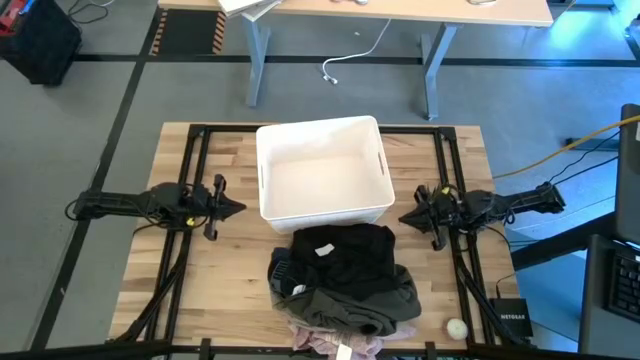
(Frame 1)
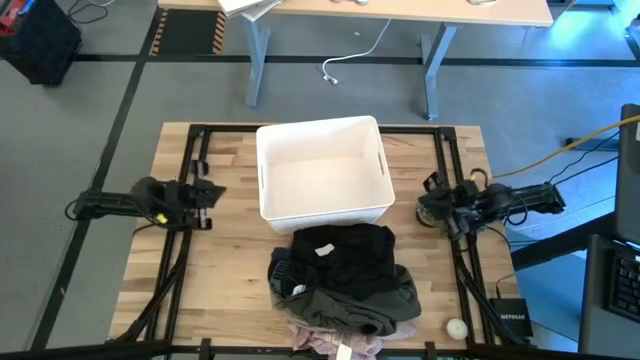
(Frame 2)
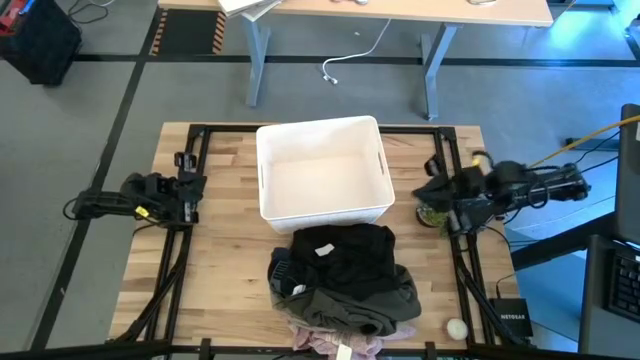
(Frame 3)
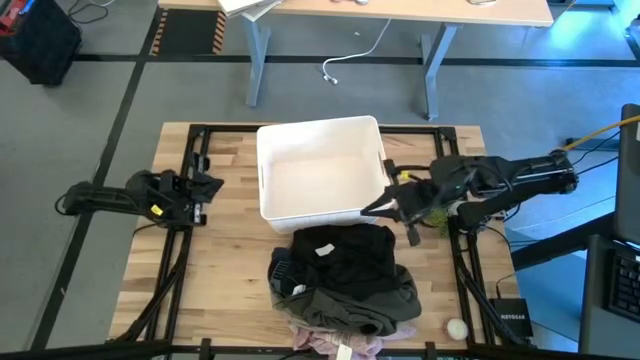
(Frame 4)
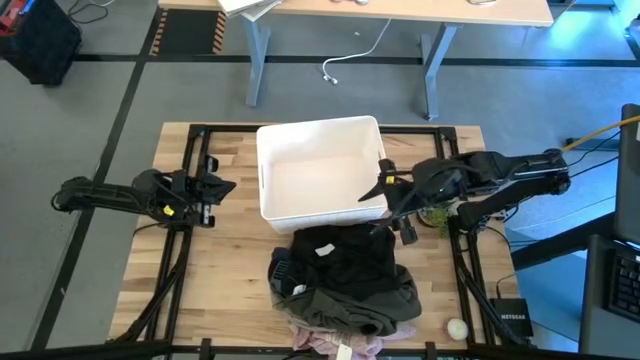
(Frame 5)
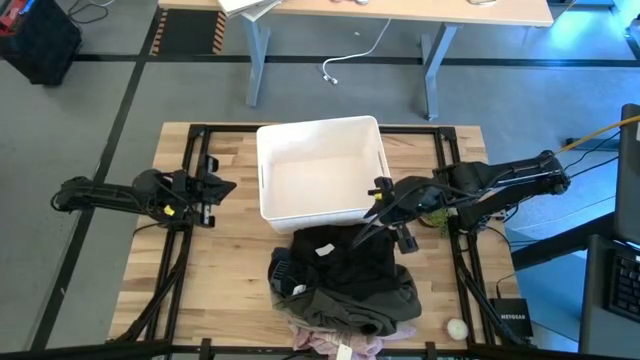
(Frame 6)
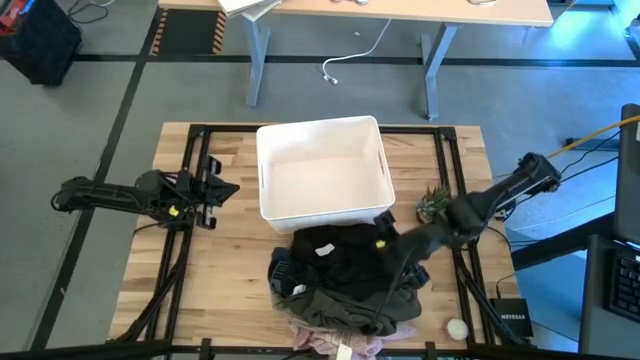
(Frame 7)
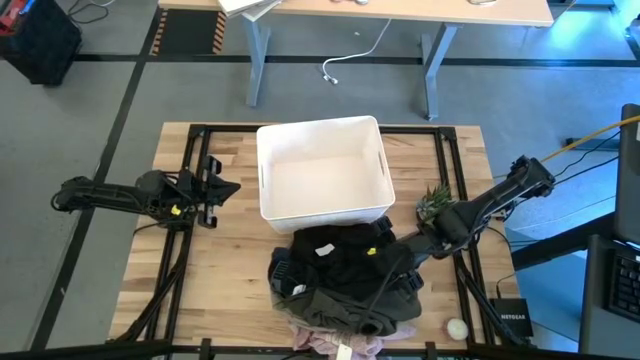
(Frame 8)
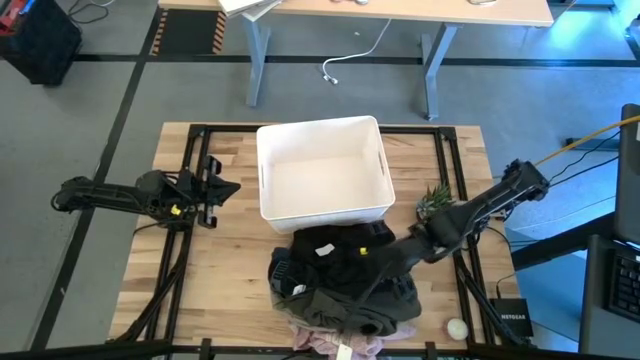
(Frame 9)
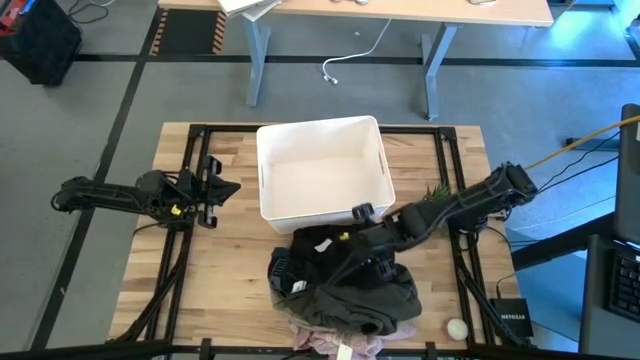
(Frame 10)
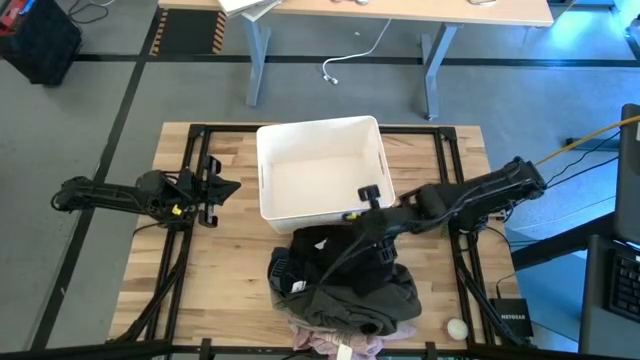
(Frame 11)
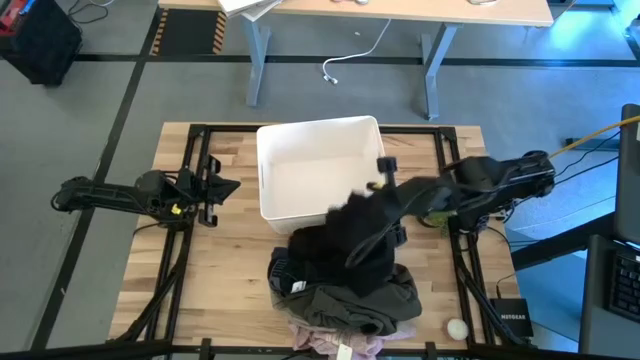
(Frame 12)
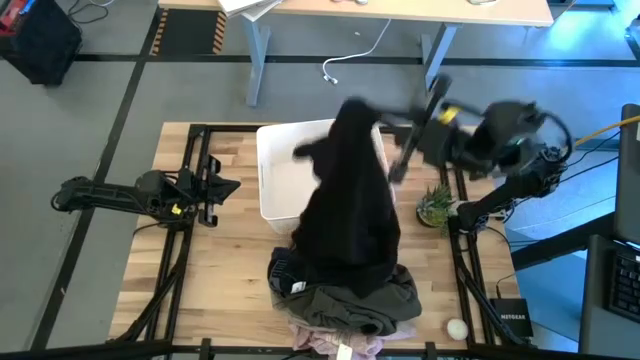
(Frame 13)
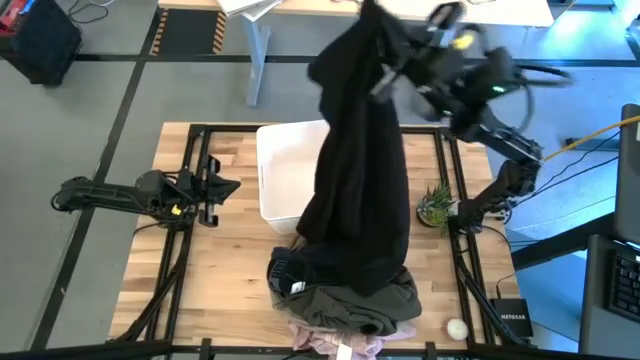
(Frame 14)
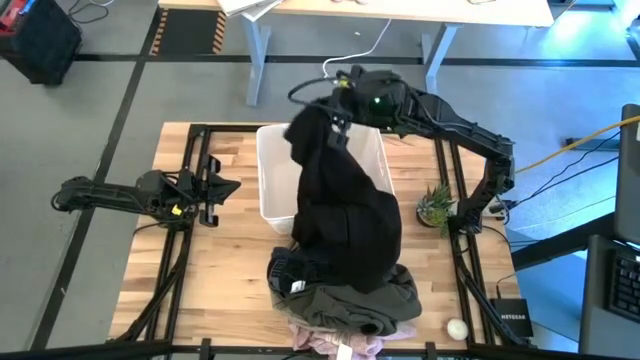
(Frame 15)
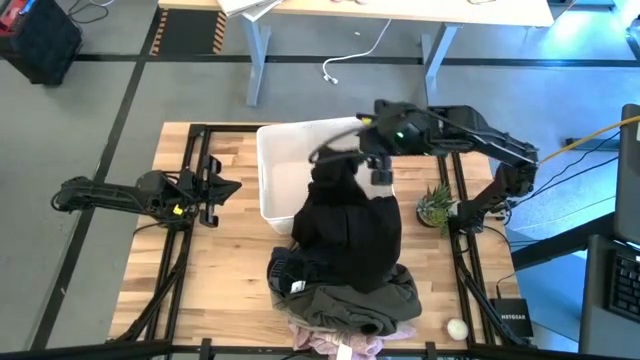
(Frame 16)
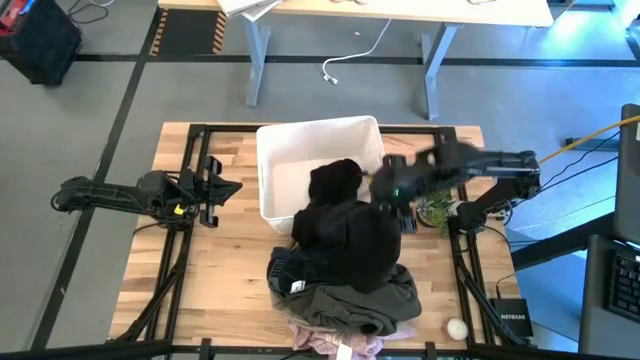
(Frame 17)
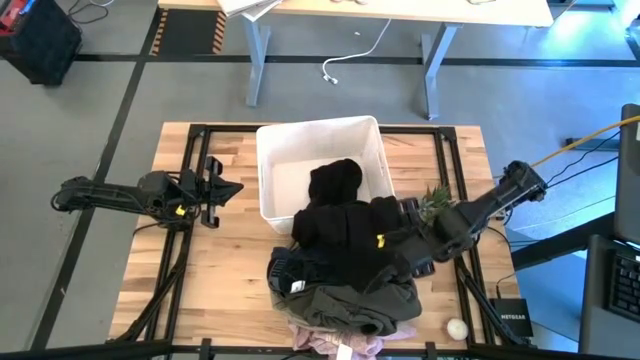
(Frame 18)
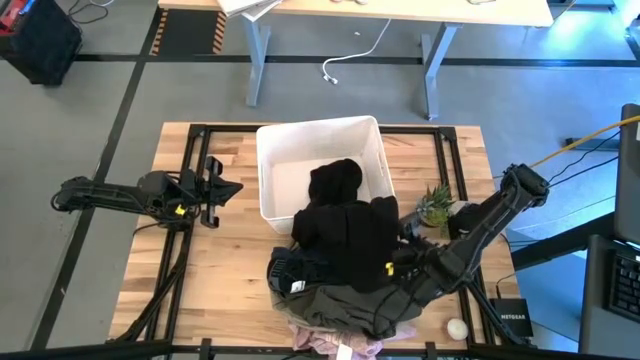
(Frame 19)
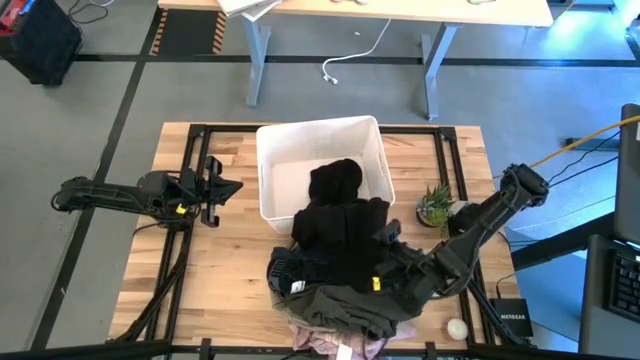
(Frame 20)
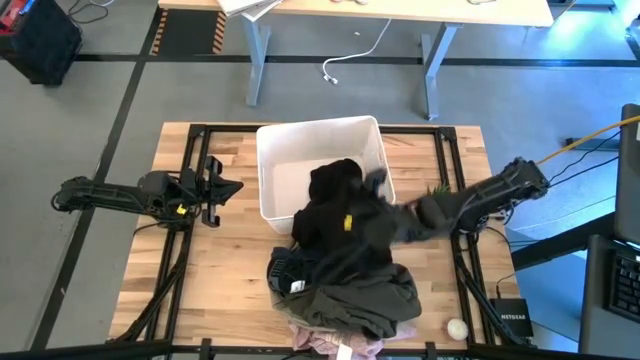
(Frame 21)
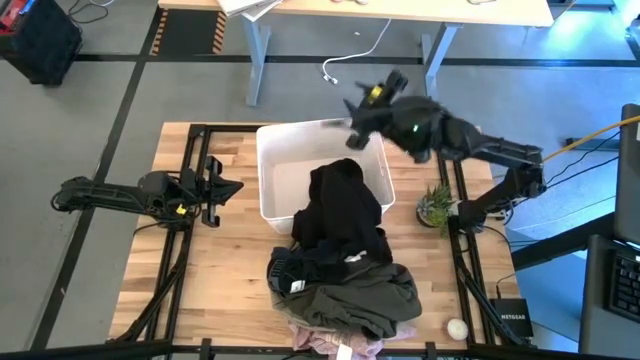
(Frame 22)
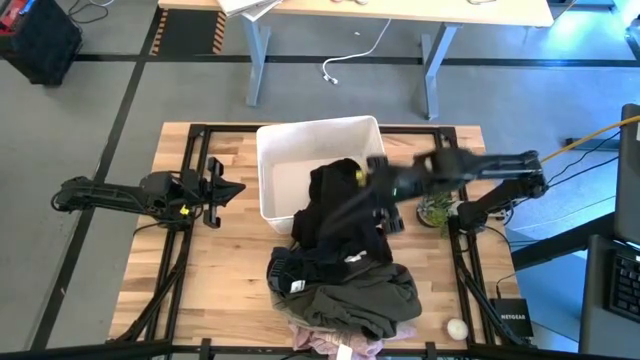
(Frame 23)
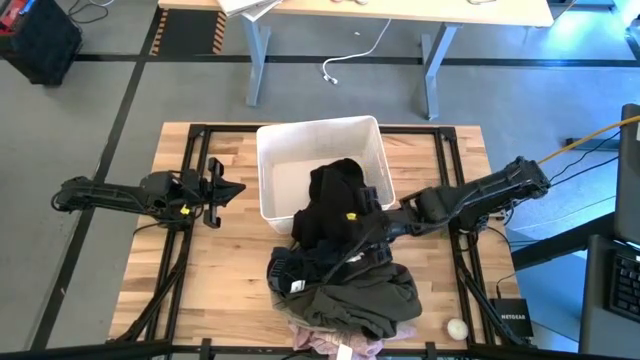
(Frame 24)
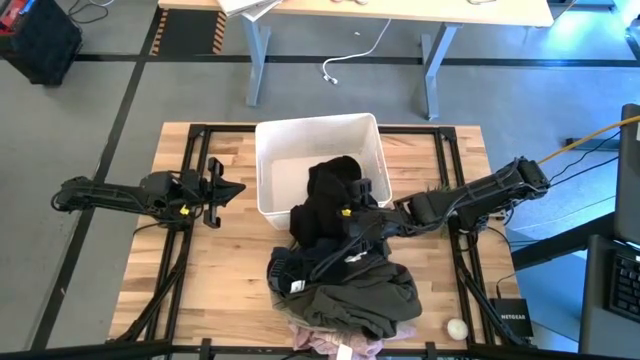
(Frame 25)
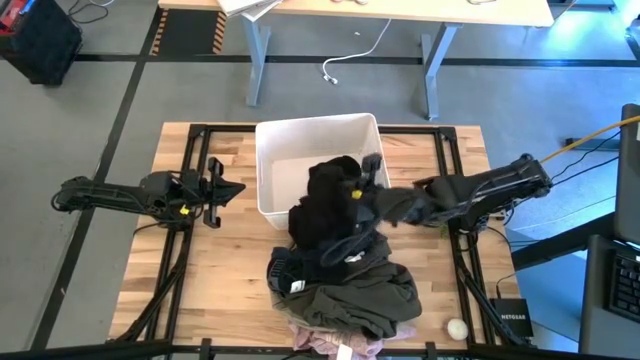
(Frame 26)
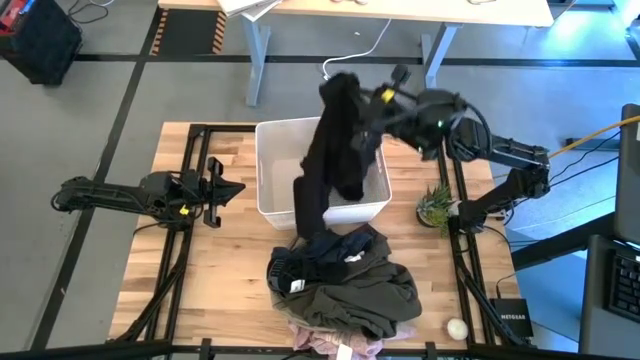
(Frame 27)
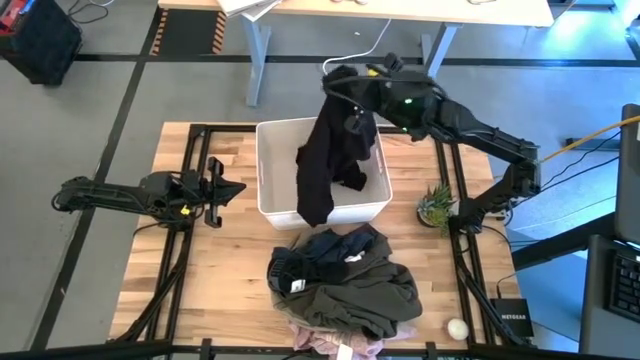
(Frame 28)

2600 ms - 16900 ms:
Task: Sort clothes
Put the black jacket into the laundry bin

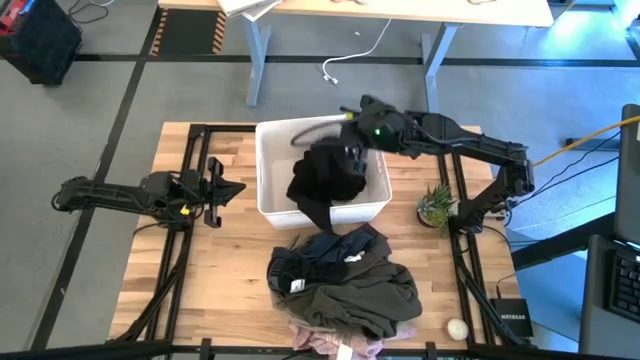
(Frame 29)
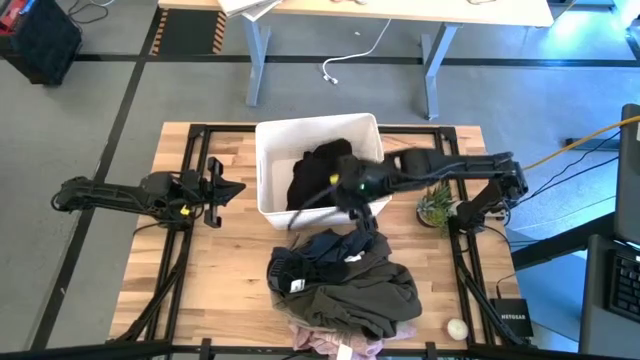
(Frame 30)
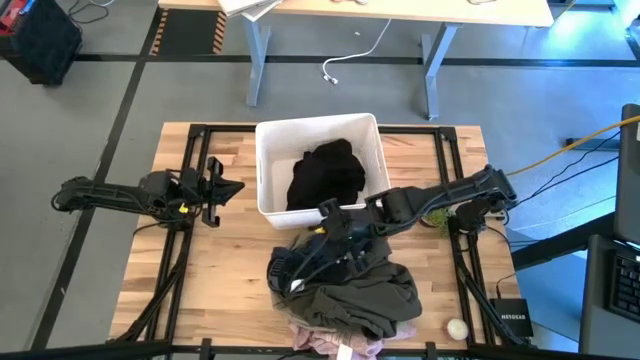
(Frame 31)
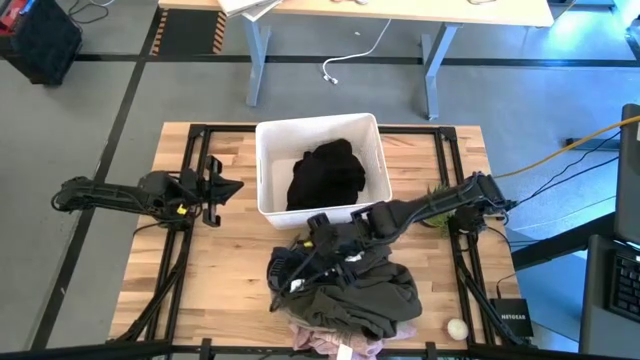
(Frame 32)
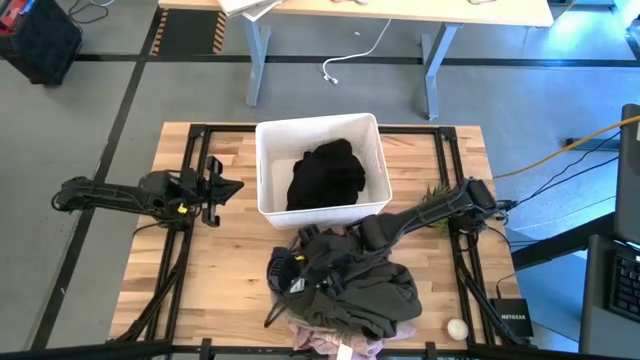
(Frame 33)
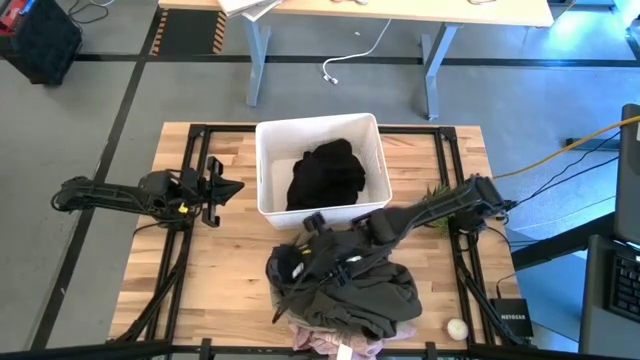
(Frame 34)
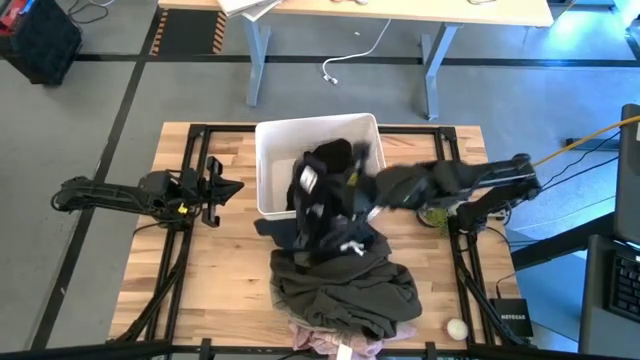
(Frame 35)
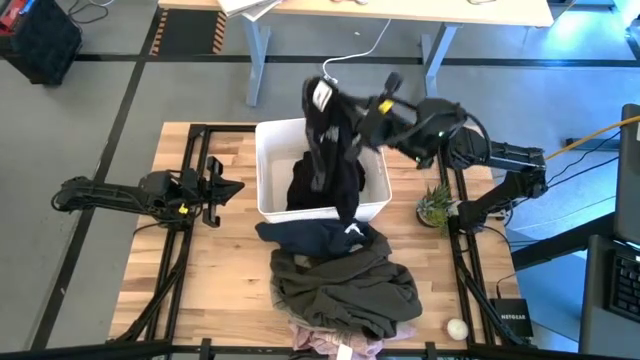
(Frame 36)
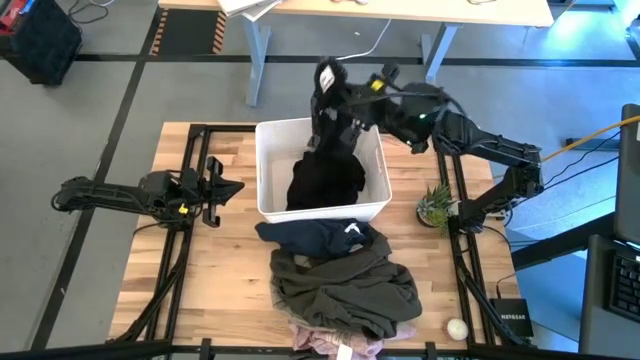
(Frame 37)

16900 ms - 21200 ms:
Put the black boxer into the laundry bin

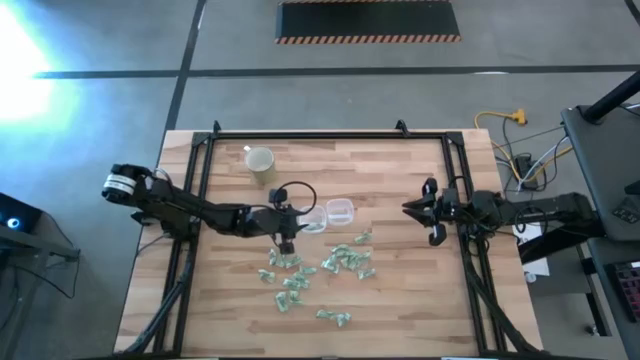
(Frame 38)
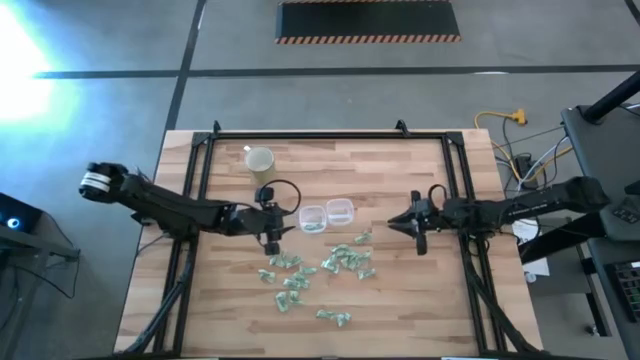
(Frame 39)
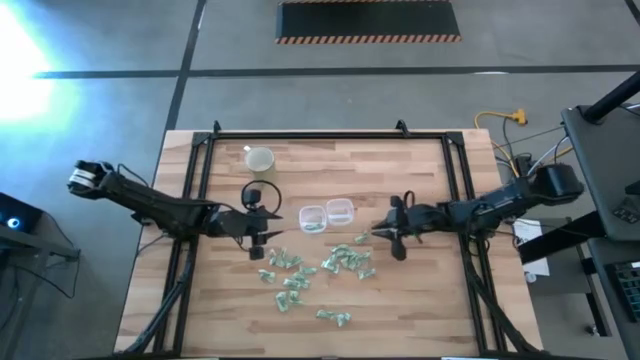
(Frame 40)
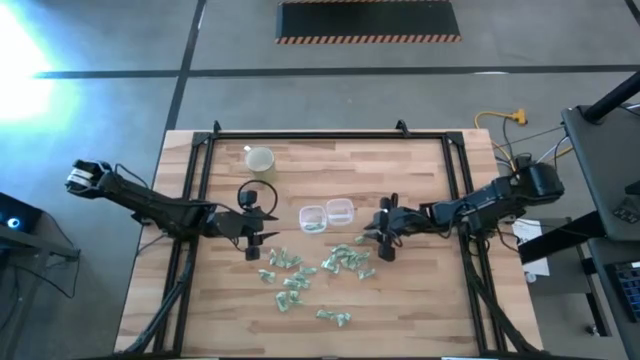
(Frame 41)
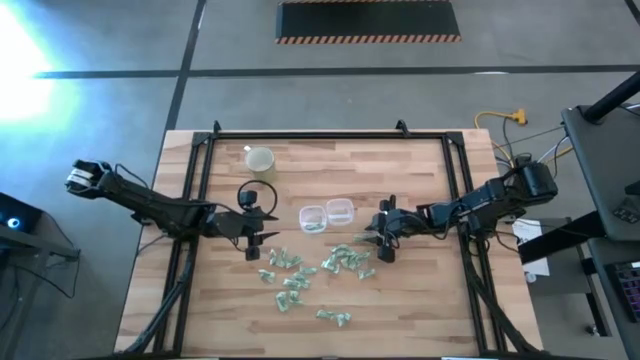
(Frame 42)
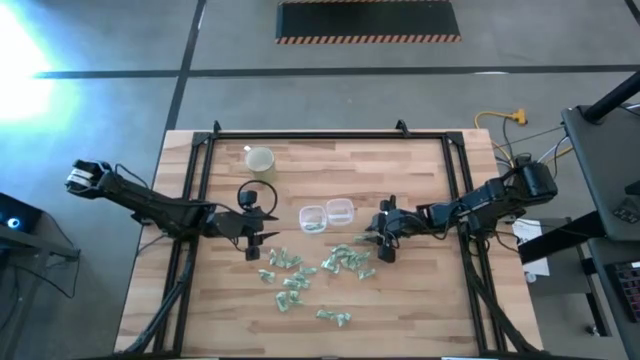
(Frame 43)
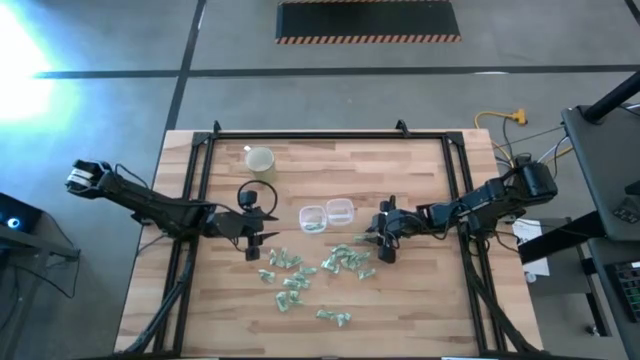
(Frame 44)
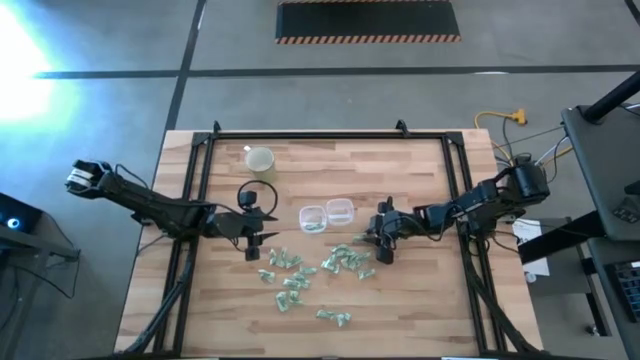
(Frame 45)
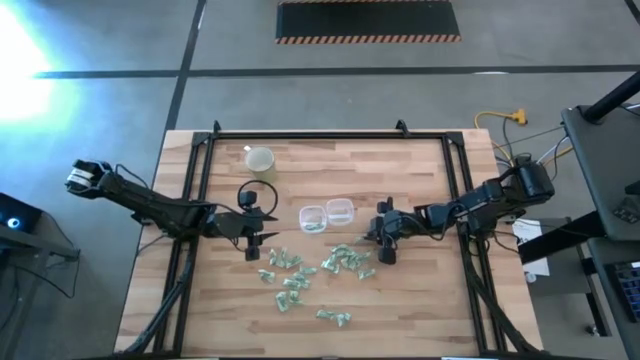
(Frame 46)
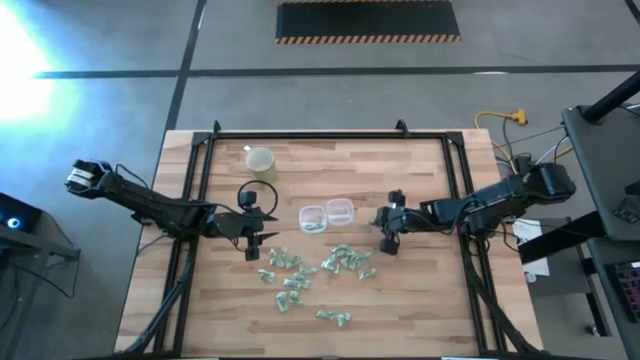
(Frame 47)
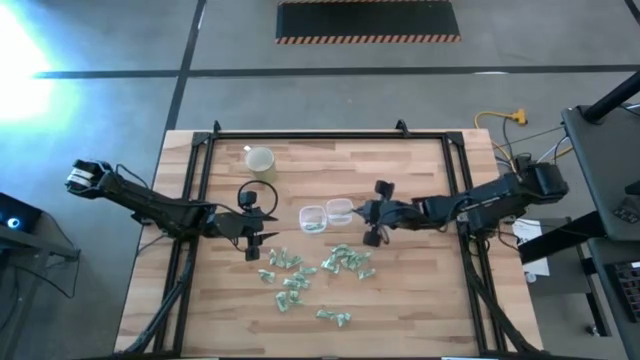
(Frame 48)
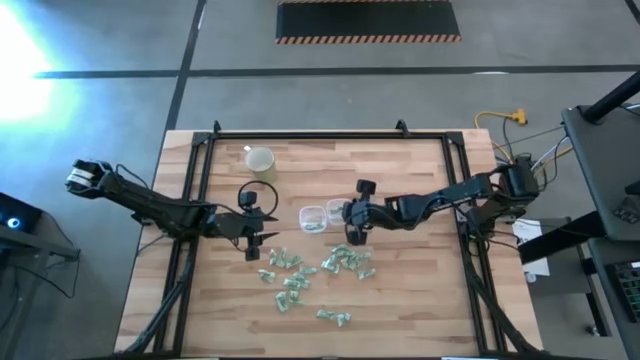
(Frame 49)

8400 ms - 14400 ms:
Task: Pick and place items into bin
Put the stevia packet into the right transparent bin
